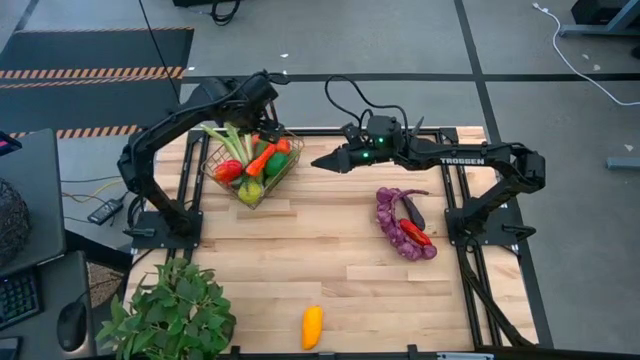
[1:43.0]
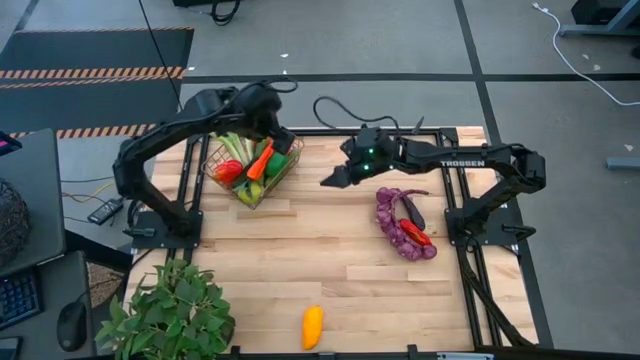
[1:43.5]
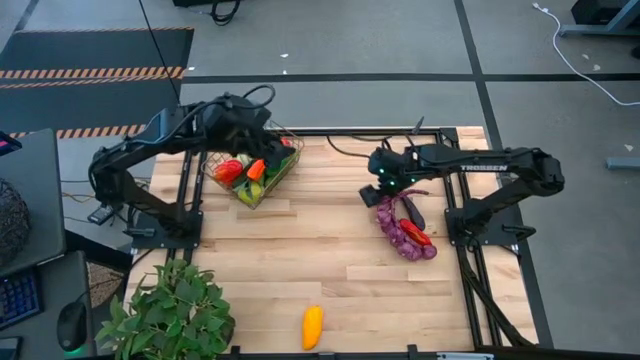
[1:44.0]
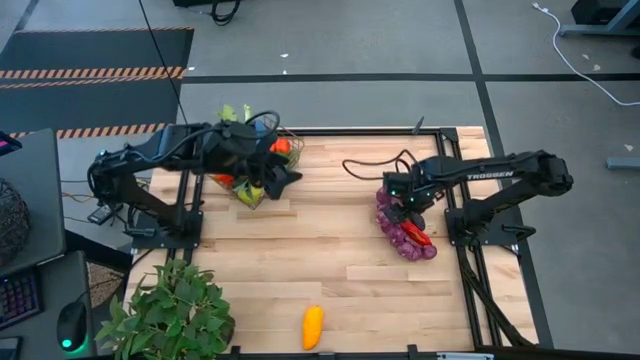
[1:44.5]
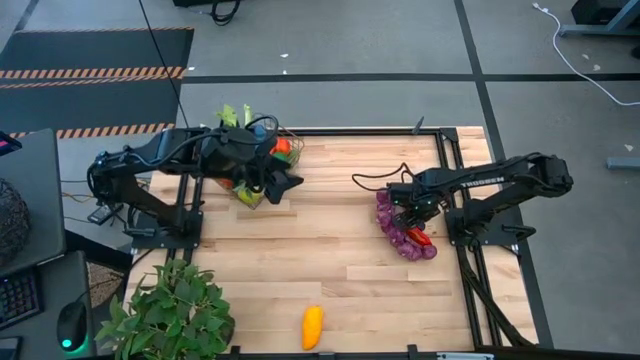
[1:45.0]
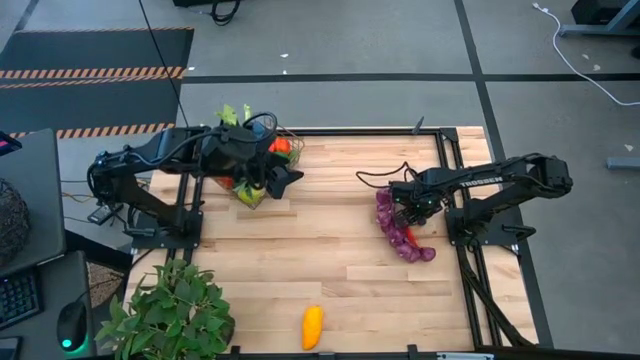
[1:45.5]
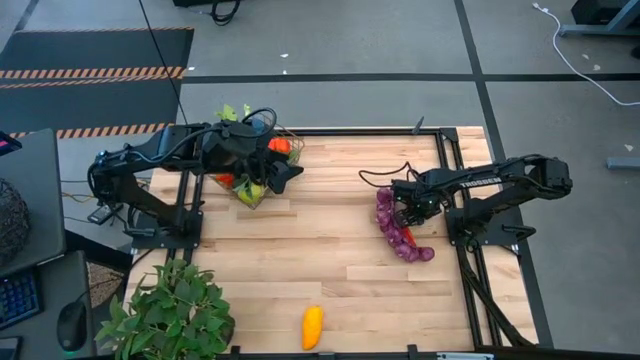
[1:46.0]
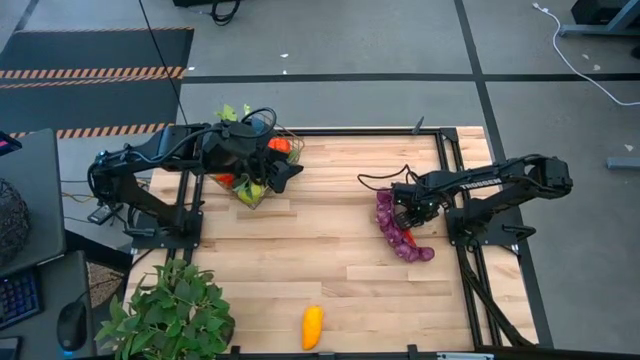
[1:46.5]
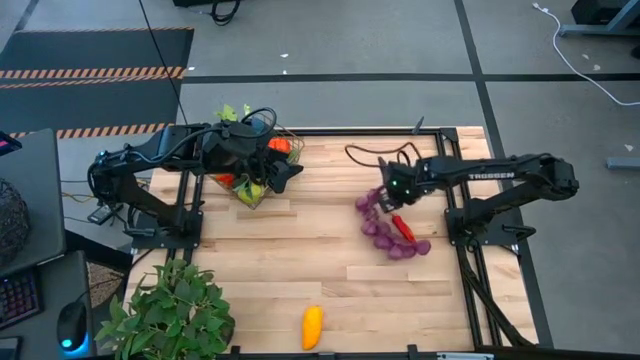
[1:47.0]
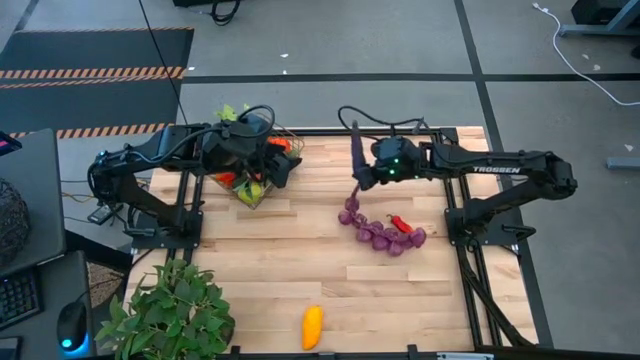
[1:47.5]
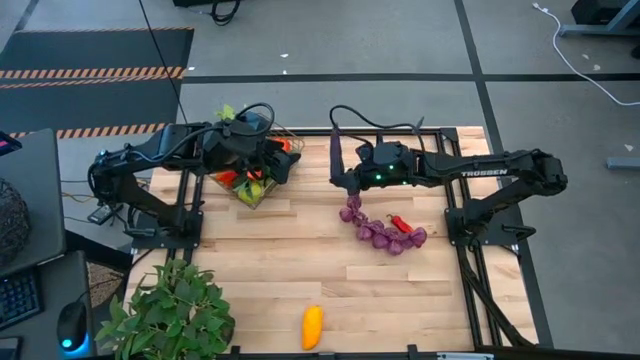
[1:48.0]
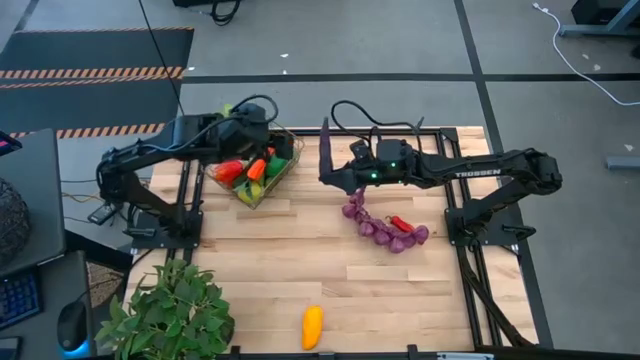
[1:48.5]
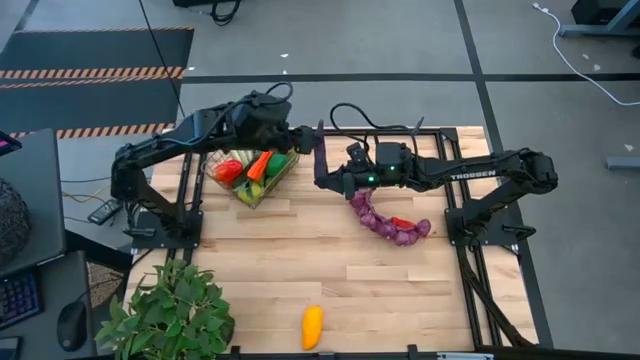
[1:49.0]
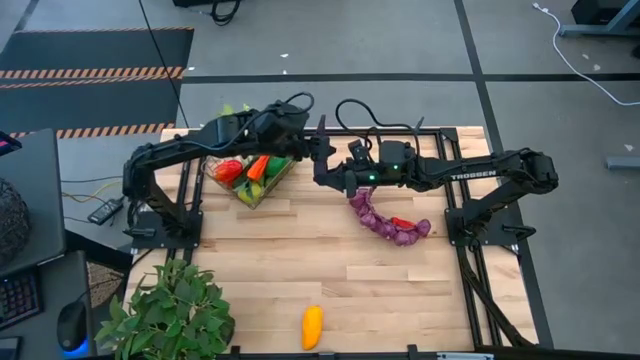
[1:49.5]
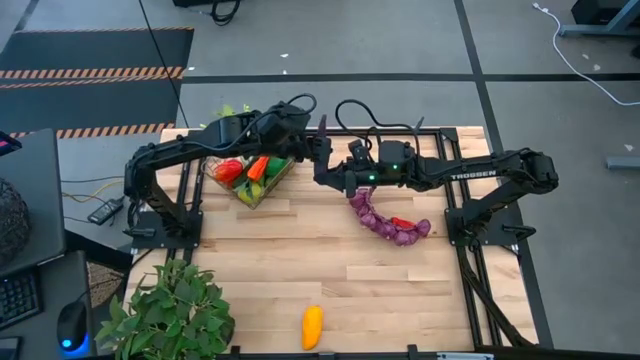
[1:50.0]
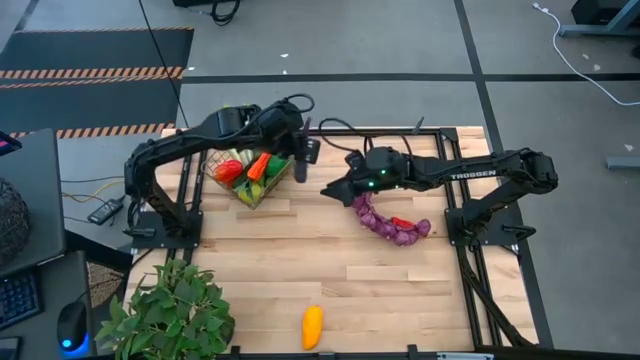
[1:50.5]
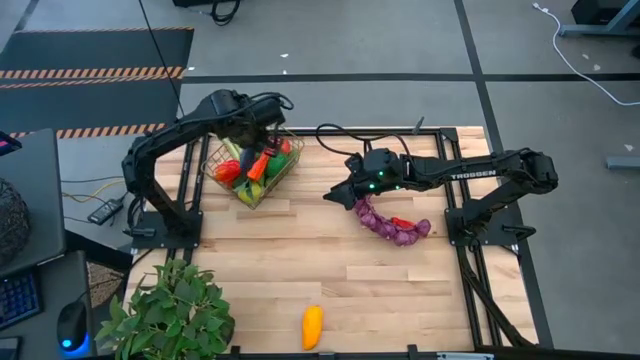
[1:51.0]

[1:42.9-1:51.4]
Task: Build produce basket
Put the eggplant into the wire basket

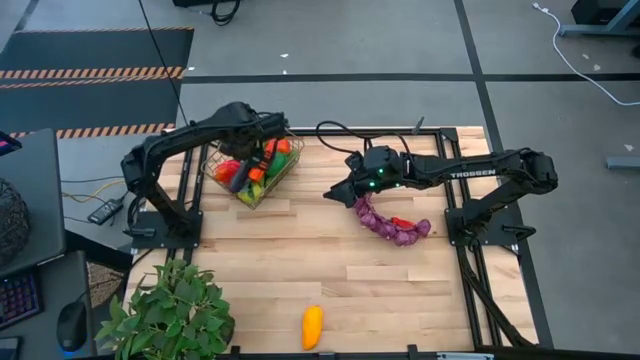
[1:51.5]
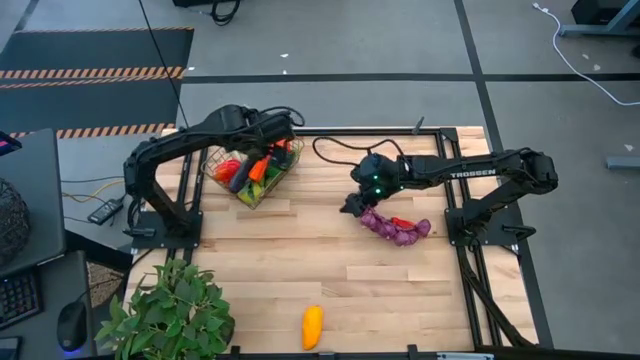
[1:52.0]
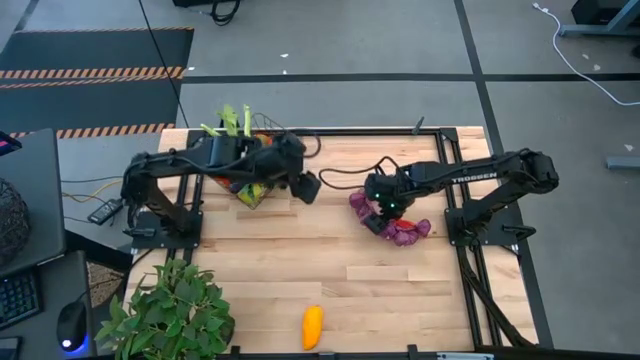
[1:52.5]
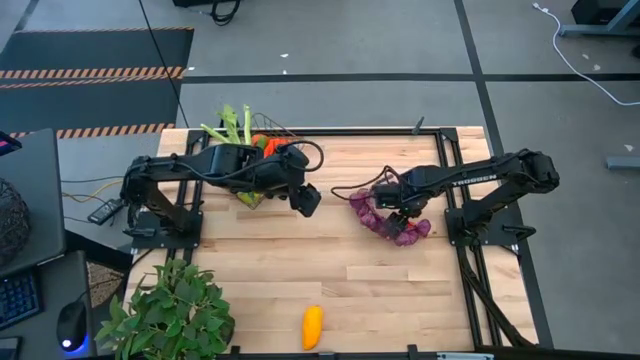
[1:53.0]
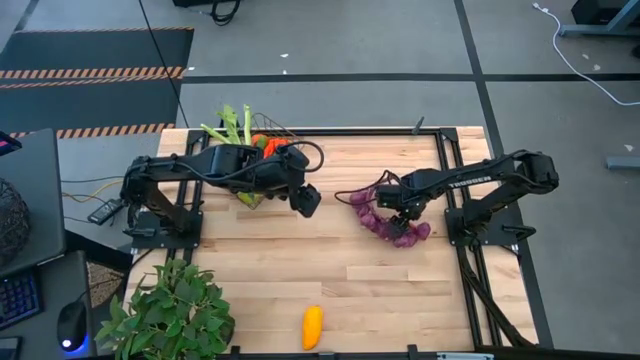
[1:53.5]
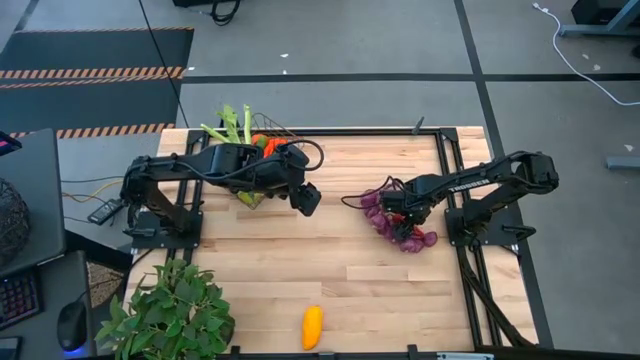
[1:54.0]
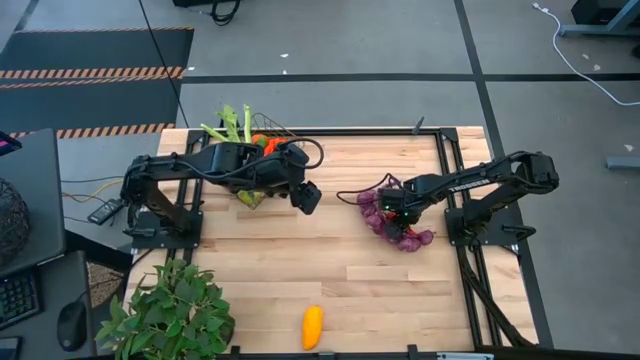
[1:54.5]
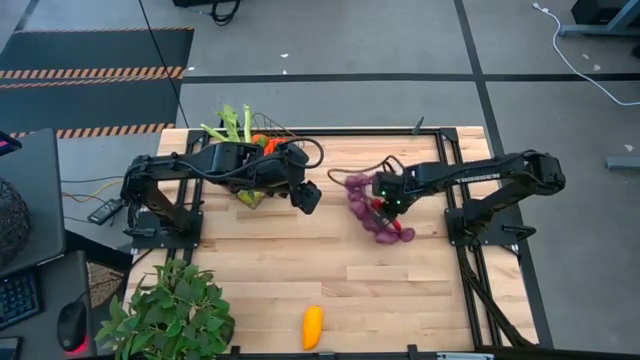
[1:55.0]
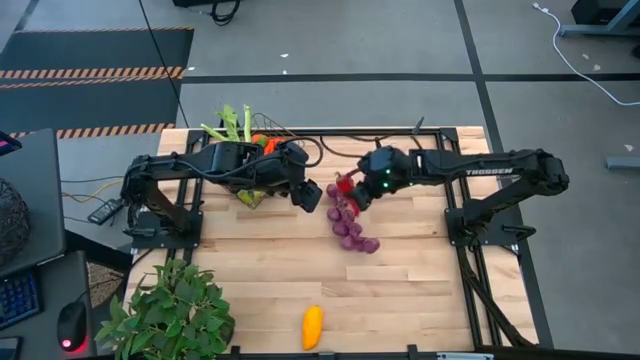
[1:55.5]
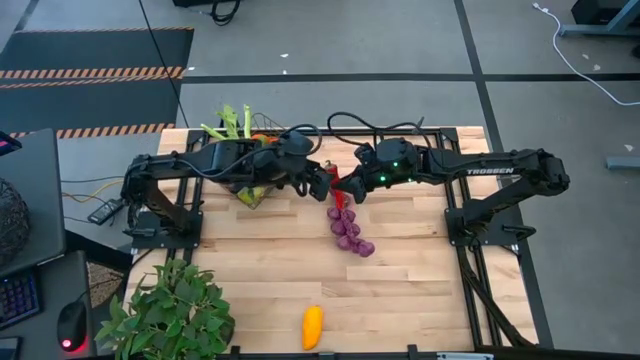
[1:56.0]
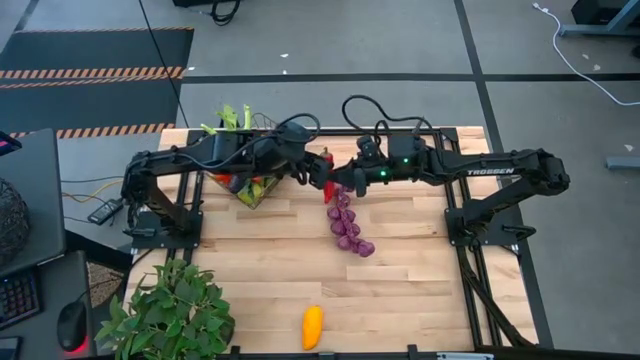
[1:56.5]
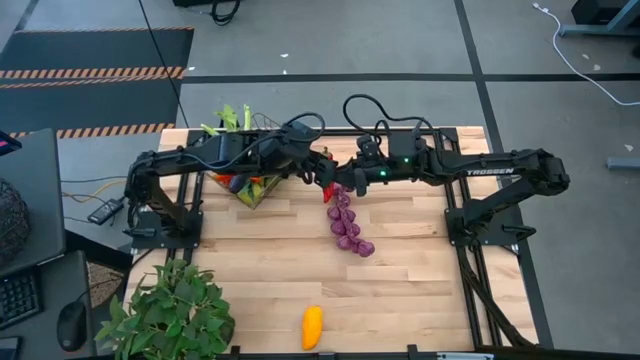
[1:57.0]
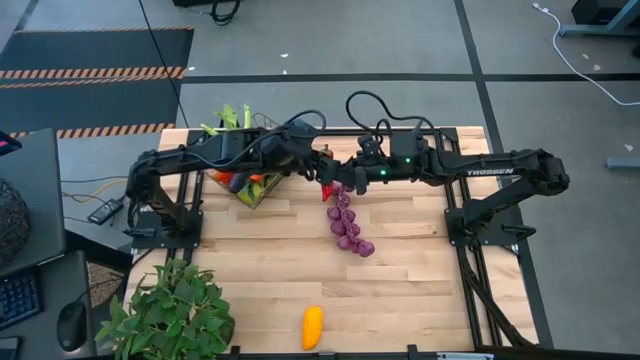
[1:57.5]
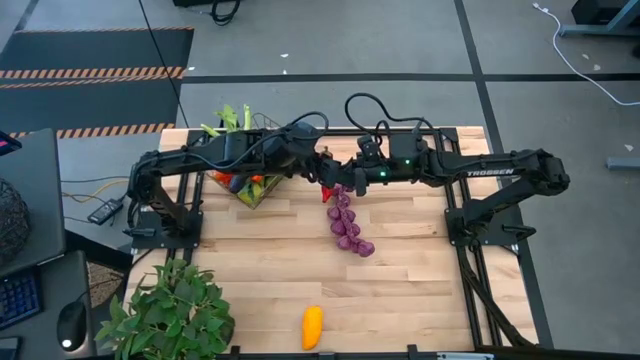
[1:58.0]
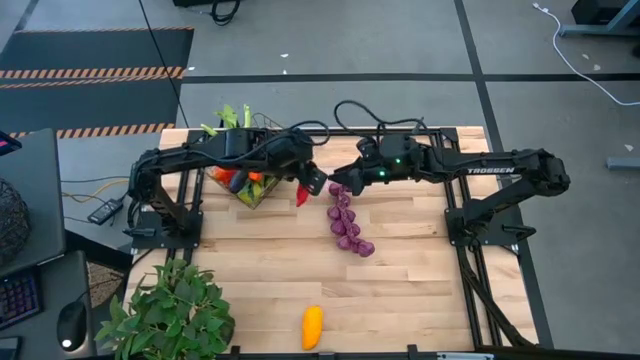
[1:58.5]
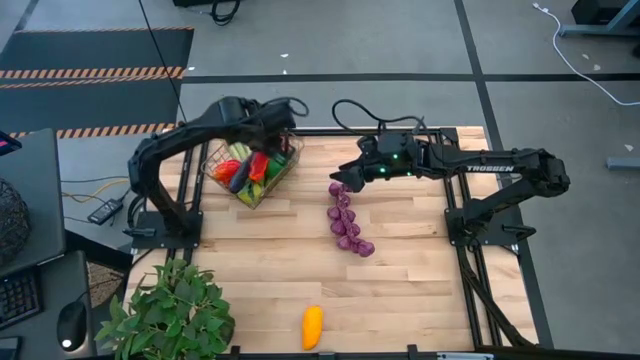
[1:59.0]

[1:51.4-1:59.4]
Put the red chili pepper into the wire basket

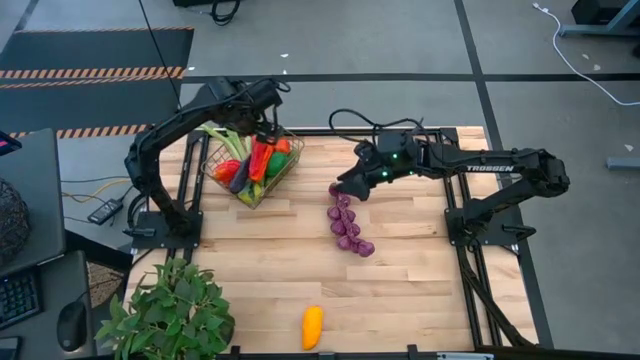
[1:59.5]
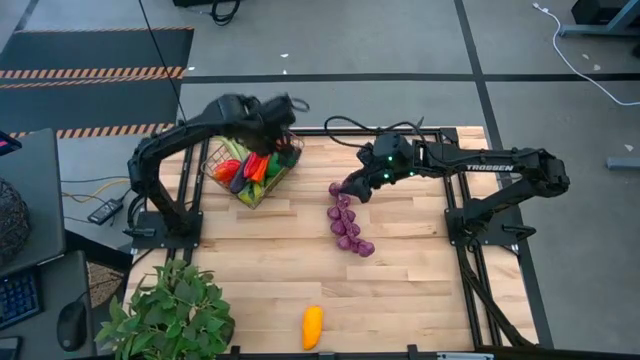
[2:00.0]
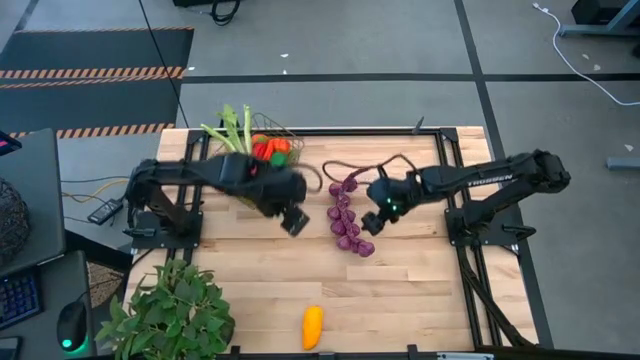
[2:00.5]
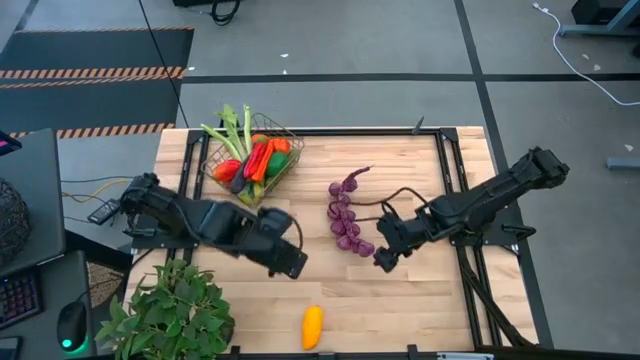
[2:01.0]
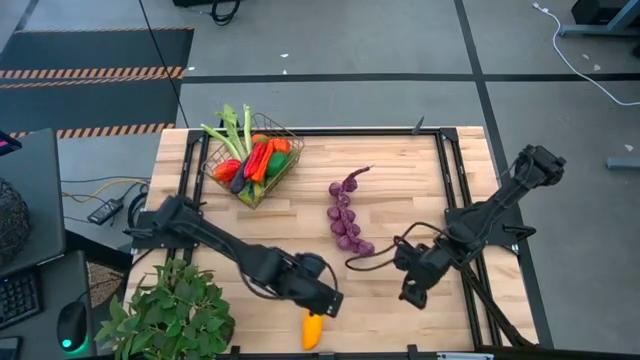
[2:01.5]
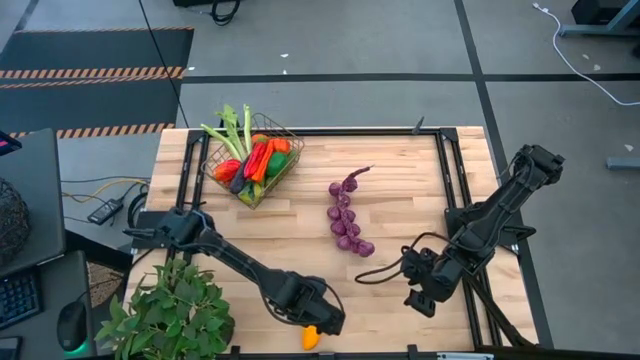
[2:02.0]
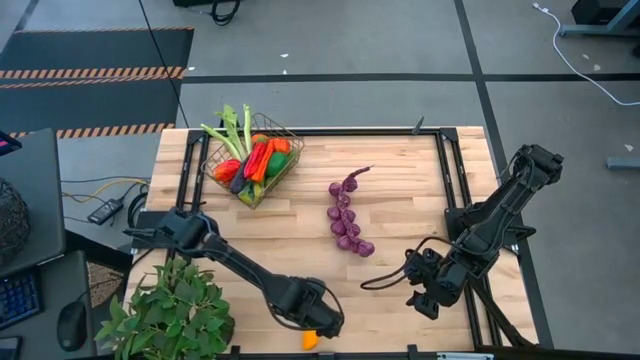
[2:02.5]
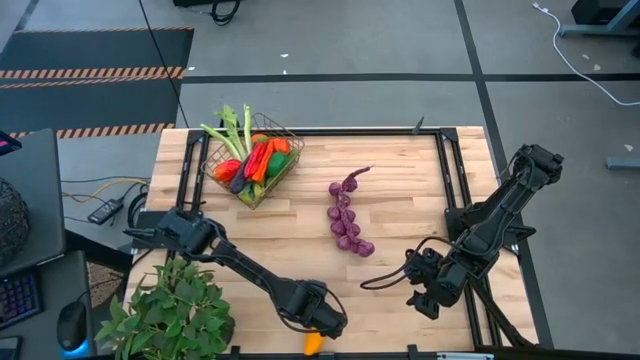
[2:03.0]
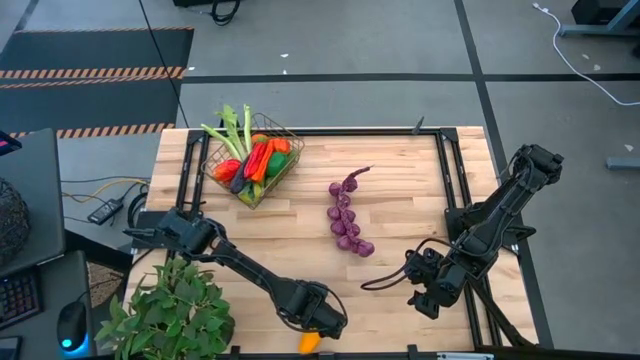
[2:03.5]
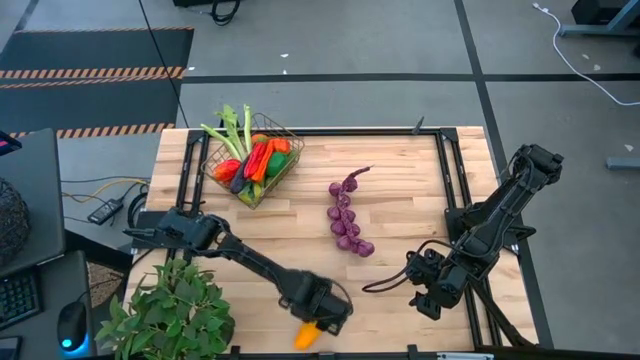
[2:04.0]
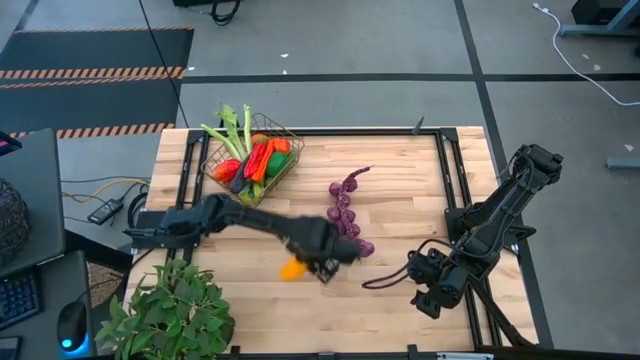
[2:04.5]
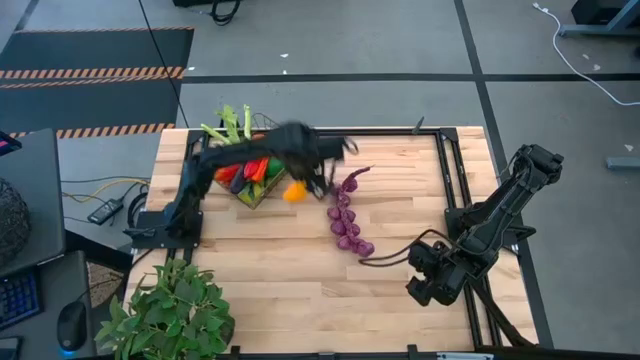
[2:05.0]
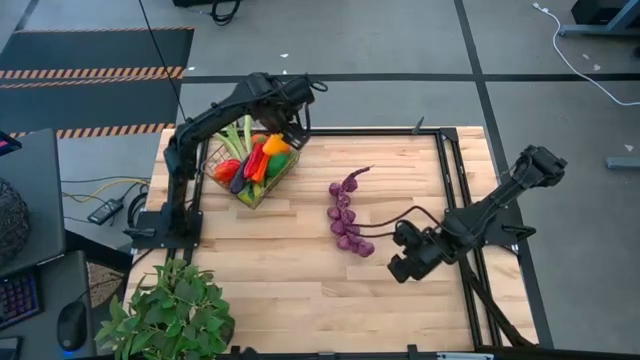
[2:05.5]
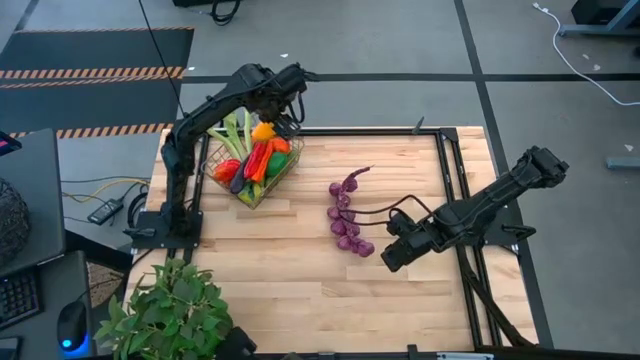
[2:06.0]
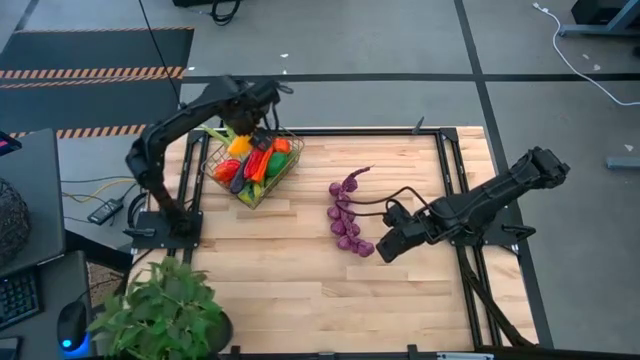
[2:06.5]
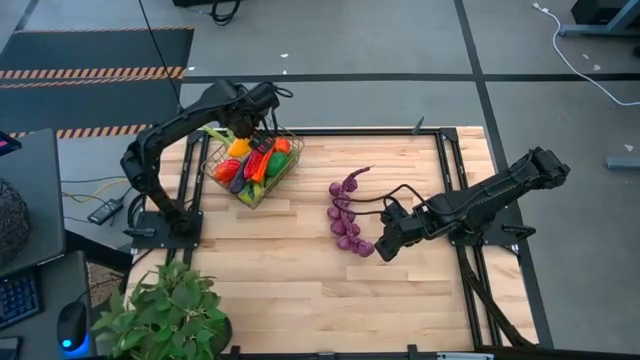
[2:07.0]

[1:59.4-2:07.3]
Put the yellow mango into the wire basket
